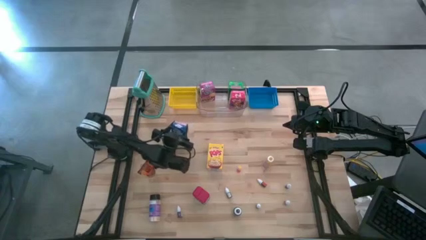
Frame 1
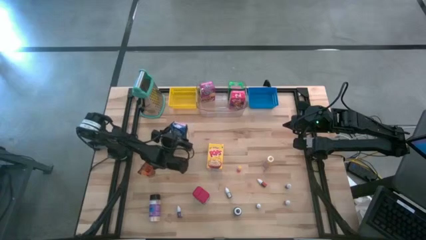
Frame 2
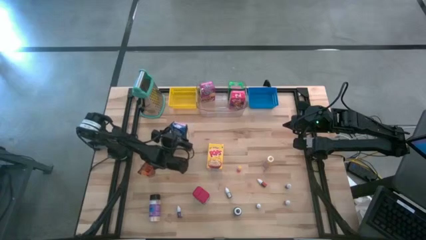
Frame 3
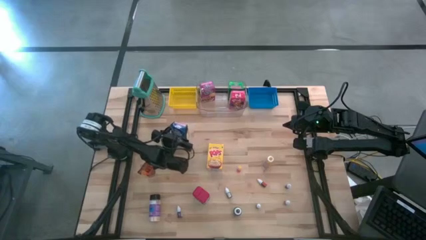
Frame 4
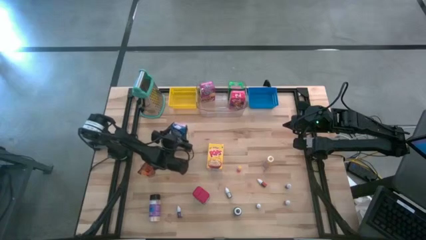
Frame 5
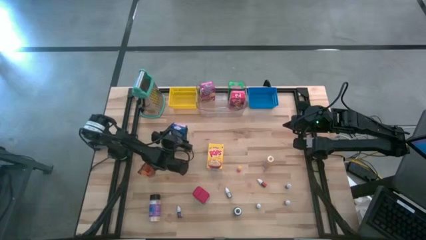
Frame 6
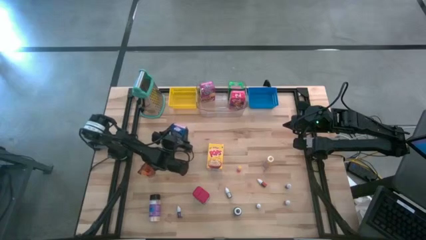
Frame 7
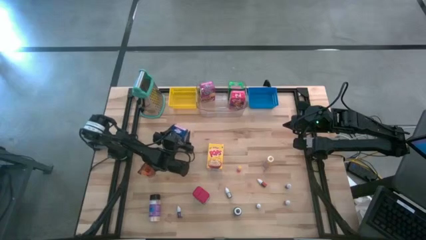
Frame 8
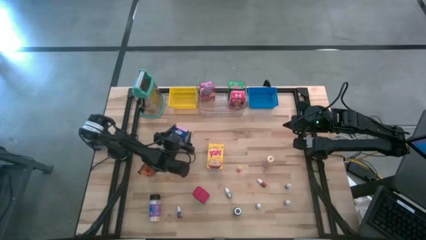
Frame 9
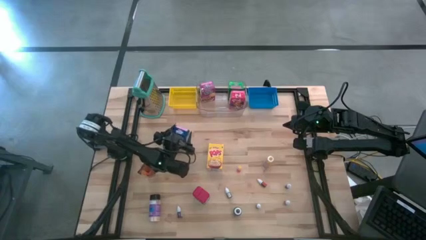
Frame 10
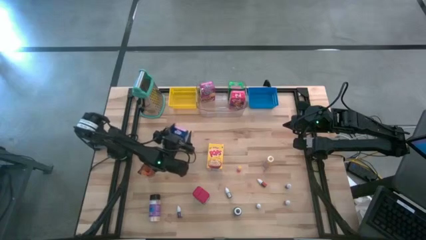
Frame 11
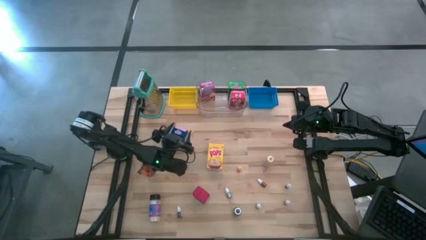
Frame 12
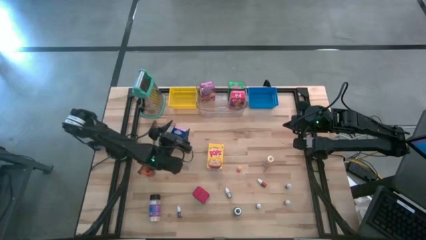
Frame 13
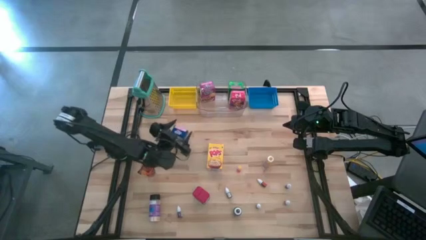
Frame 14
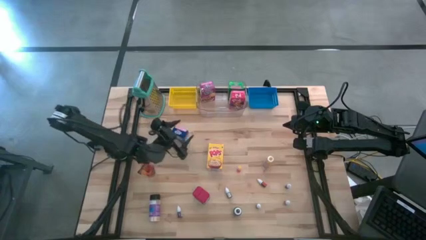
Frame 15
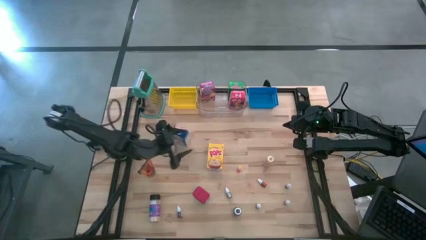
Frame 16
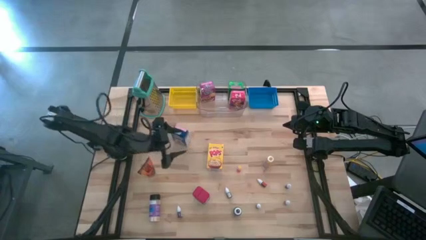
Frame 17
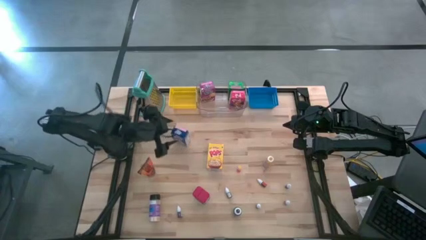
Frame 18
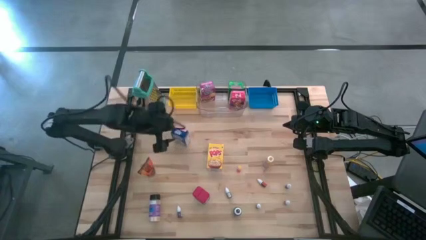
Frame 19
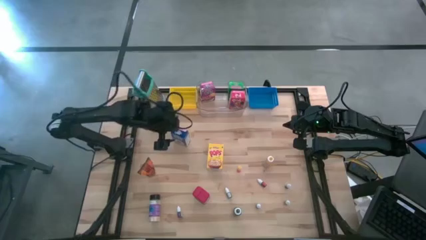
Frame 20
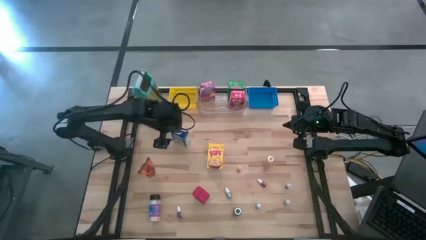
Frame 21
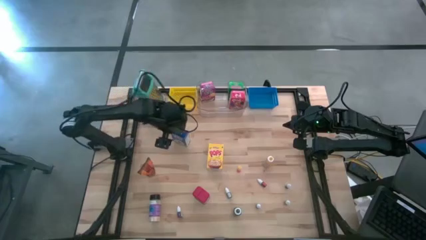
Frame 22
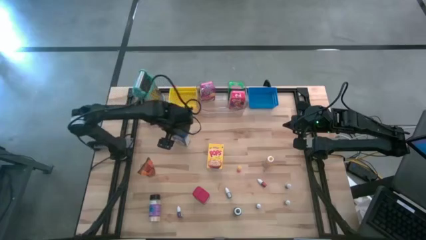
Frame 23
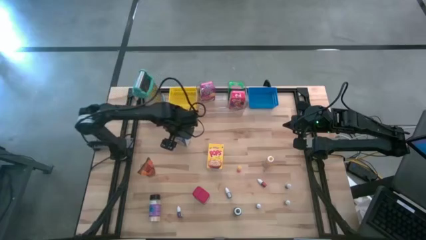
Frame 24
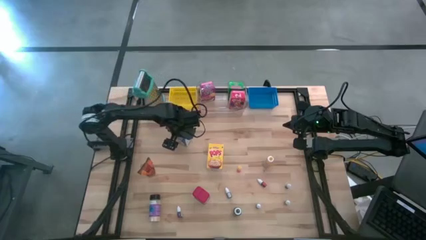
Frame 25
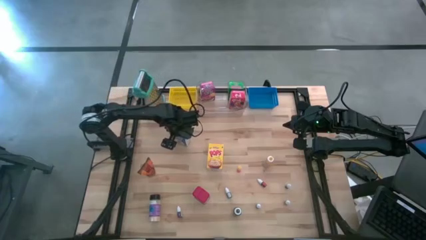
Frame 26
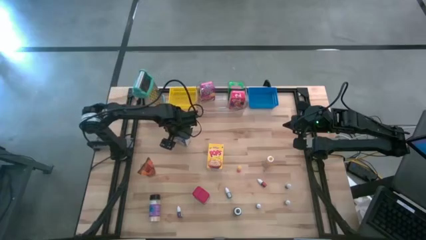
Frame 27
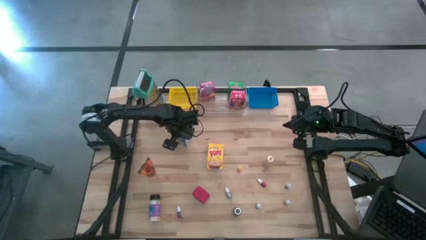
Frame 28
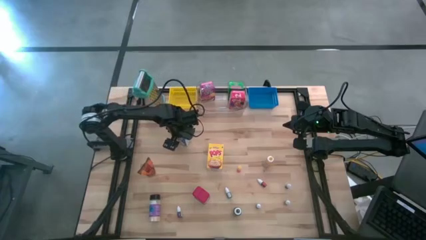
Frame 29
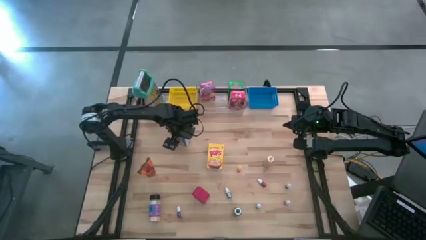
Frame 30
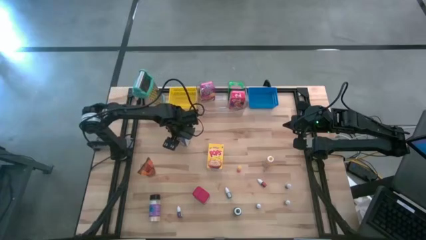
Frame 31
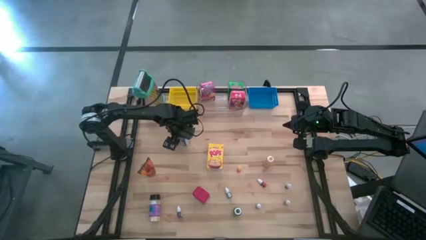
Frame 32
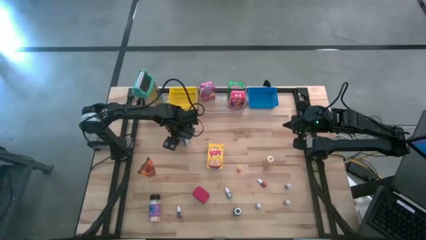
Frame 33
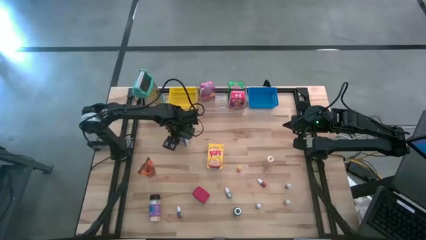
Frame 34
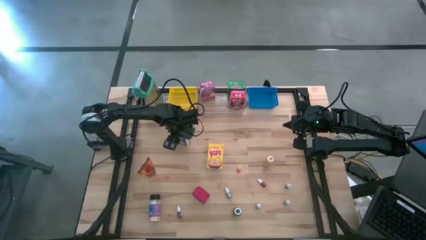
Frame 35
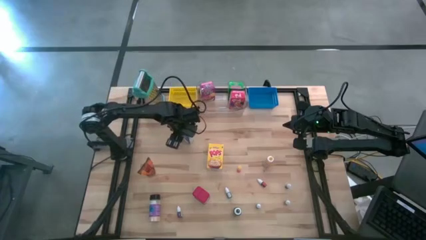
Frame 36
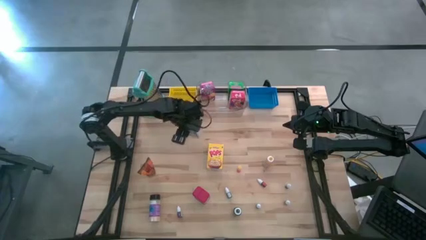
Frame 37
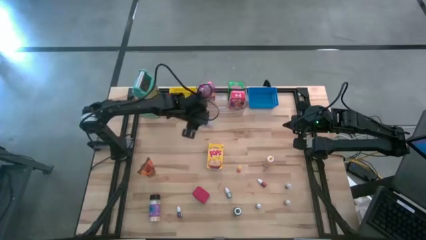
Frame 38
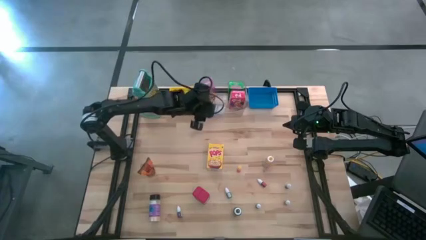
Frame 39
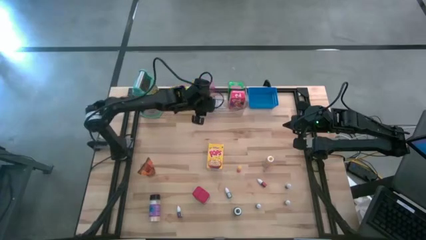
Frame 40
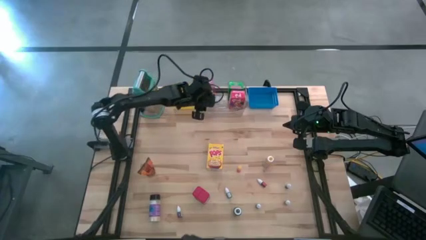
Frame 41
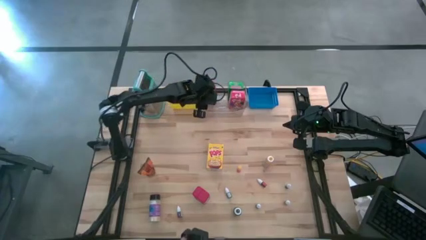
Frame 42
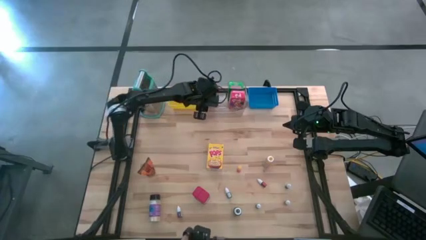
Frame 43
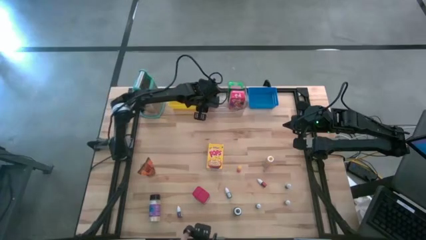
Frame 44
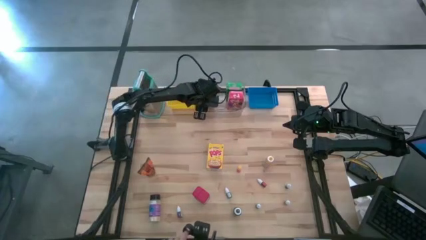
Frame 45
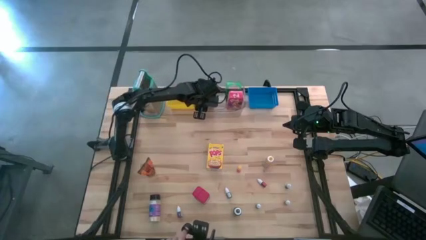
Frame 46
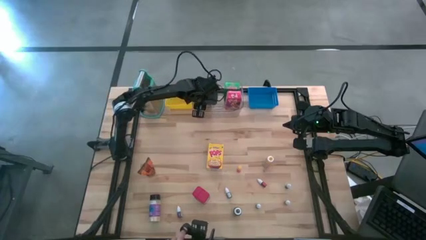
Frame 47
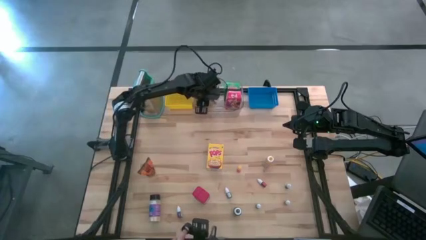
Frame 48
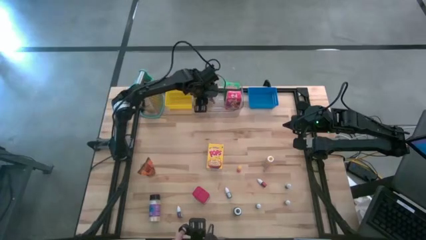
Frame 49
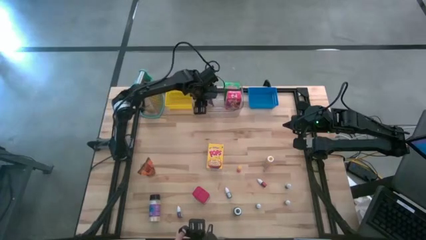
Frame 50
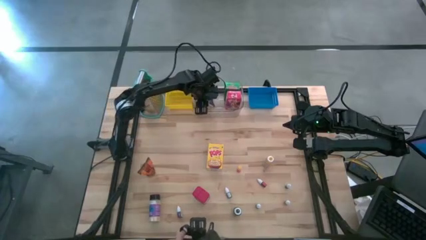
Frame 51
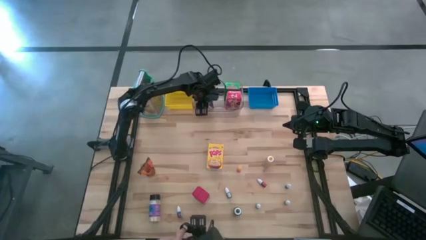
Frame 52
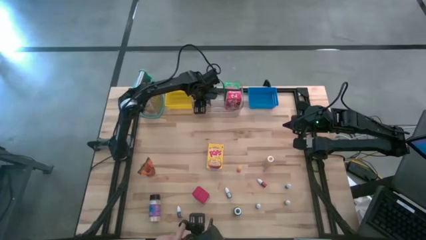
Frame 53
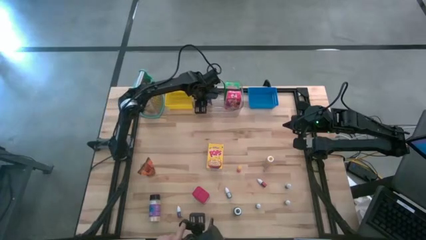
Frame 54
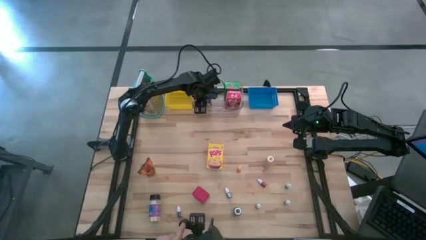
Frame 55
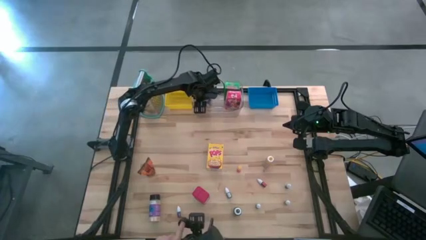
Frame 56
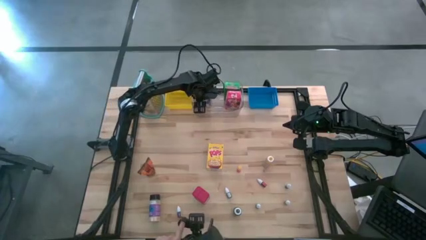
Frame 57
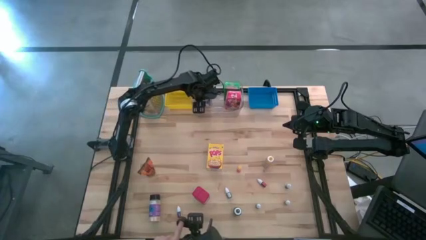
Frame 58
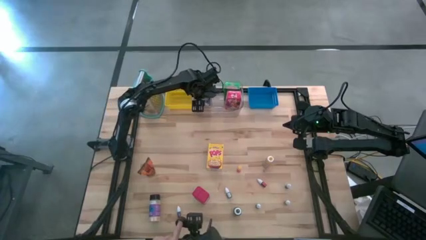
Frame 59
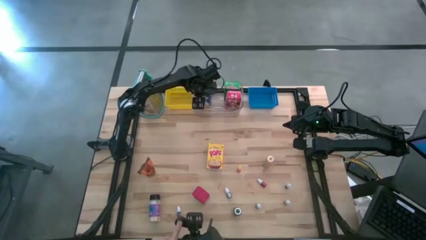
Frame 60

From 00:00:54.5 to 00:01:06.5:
Task: Pick & Place Kitchen Items
Put the blue cereal box into the transparent bin
